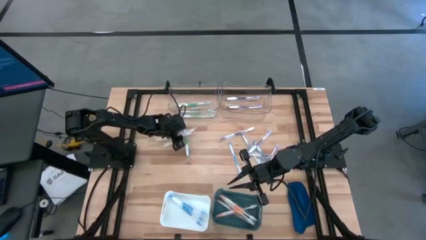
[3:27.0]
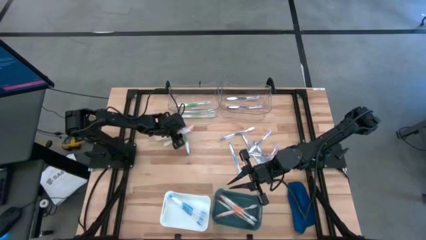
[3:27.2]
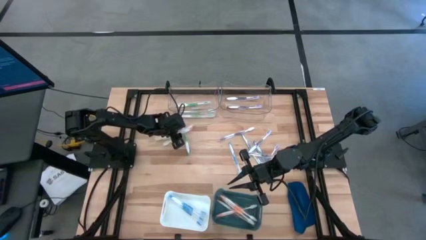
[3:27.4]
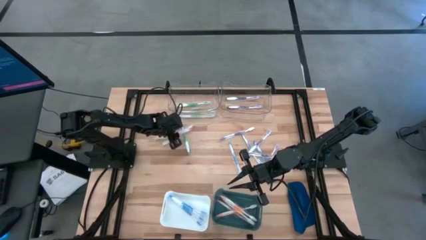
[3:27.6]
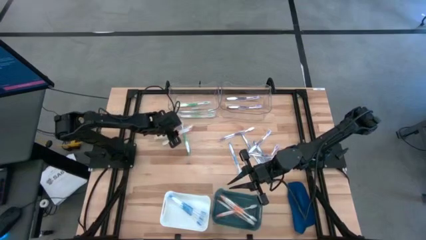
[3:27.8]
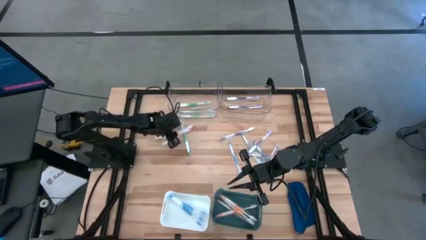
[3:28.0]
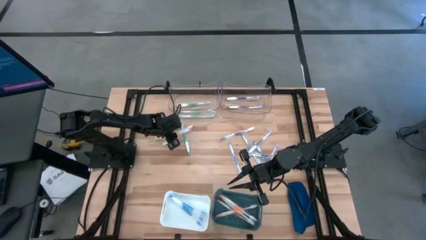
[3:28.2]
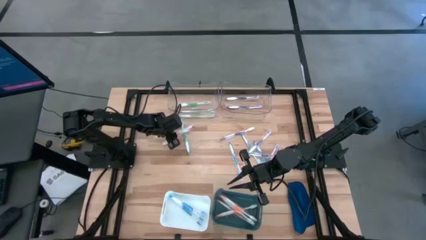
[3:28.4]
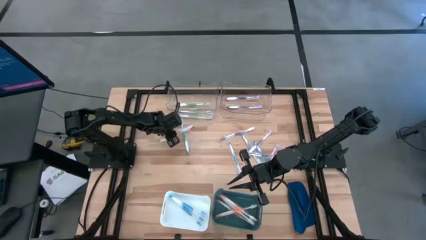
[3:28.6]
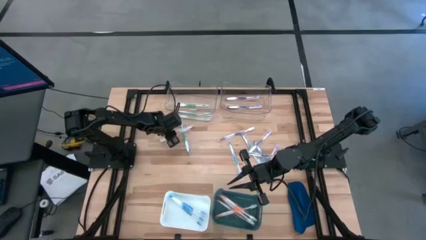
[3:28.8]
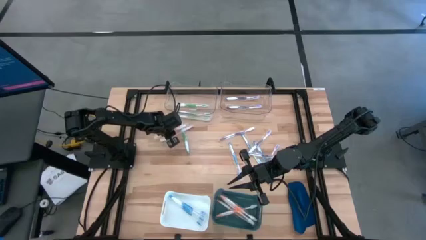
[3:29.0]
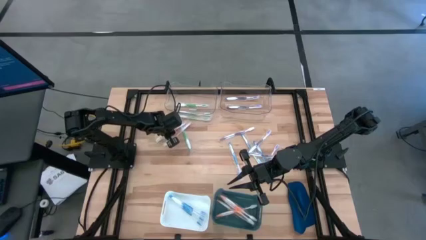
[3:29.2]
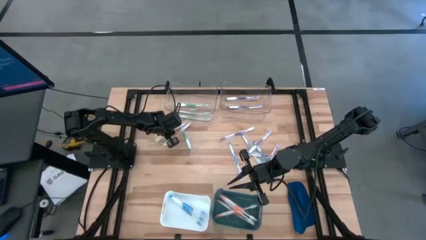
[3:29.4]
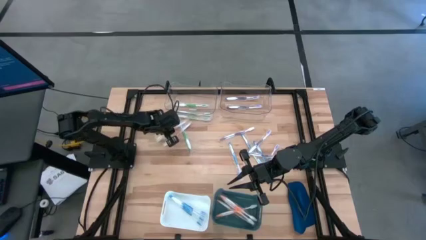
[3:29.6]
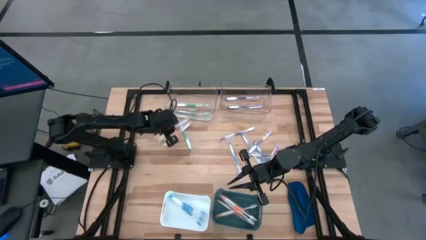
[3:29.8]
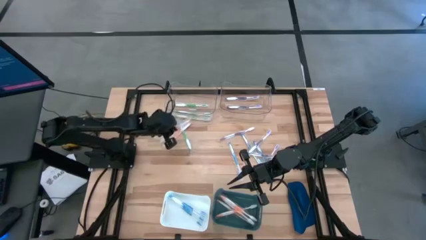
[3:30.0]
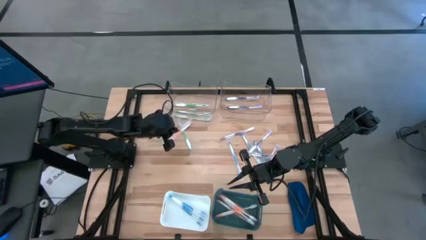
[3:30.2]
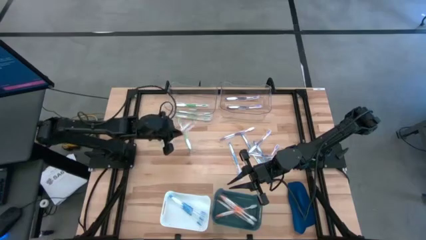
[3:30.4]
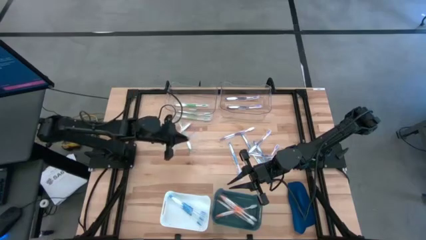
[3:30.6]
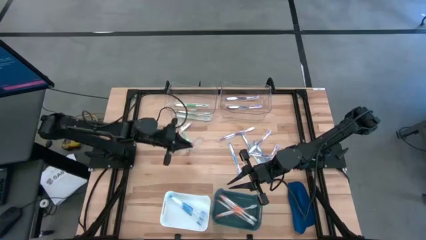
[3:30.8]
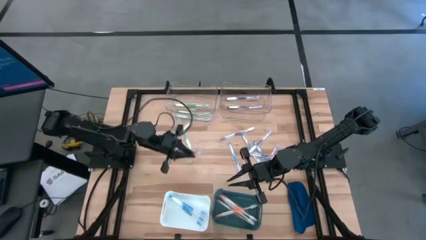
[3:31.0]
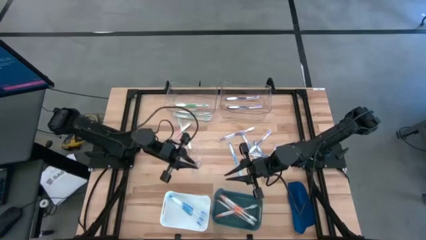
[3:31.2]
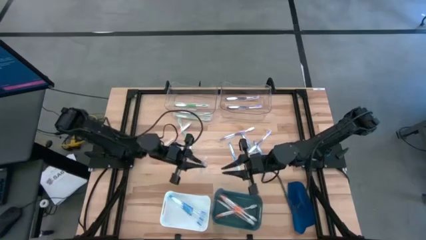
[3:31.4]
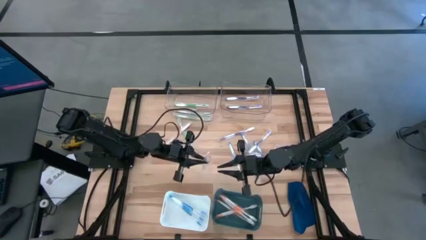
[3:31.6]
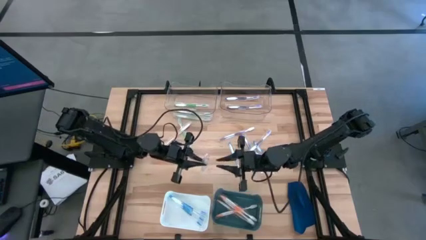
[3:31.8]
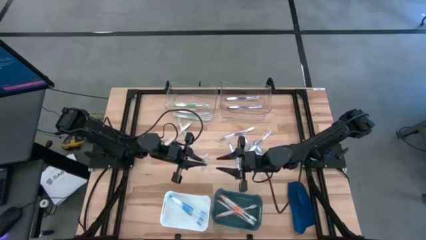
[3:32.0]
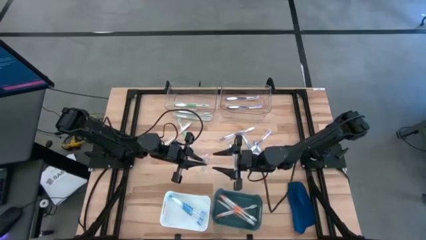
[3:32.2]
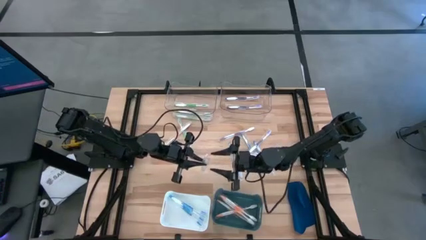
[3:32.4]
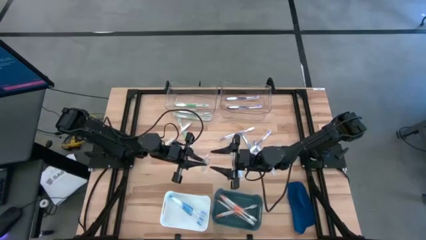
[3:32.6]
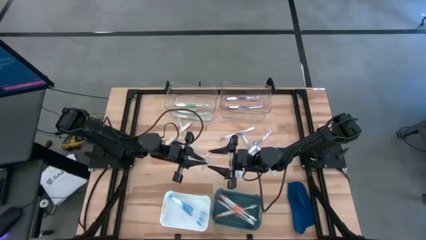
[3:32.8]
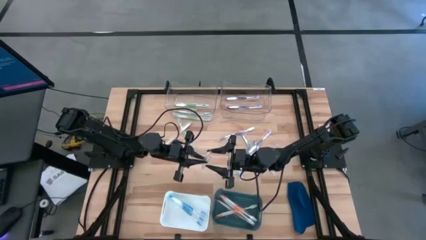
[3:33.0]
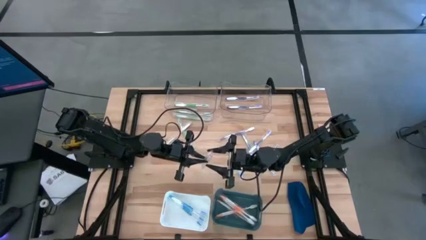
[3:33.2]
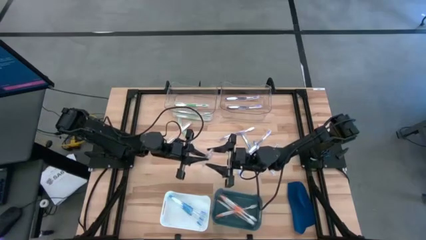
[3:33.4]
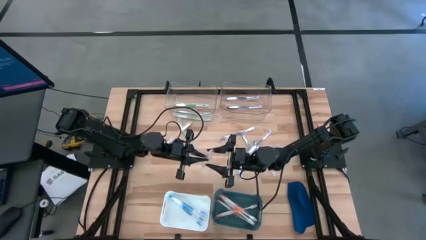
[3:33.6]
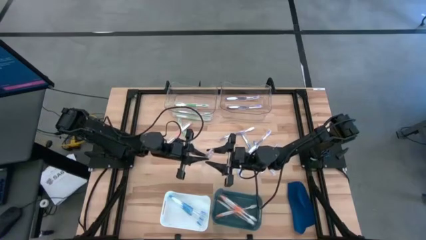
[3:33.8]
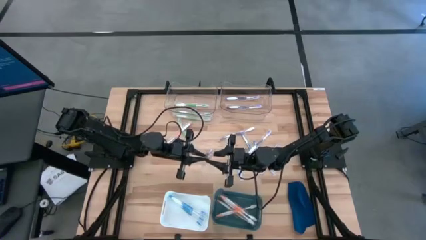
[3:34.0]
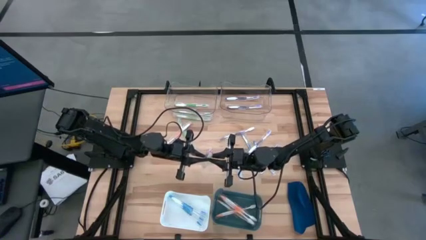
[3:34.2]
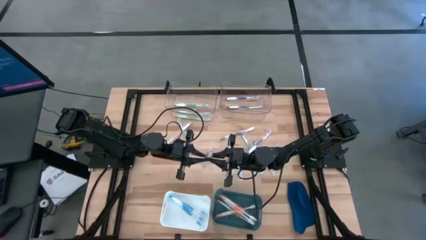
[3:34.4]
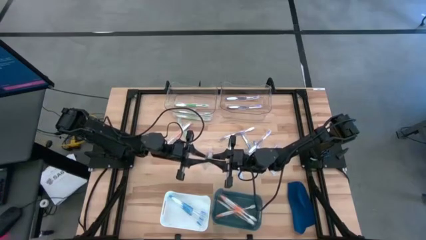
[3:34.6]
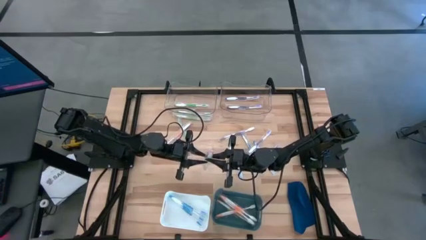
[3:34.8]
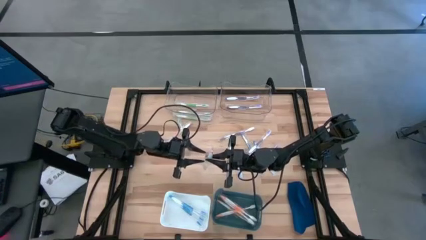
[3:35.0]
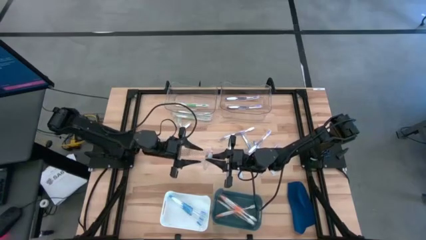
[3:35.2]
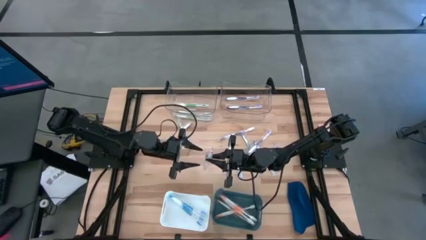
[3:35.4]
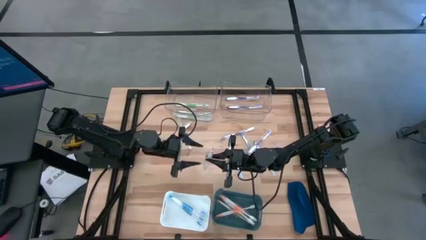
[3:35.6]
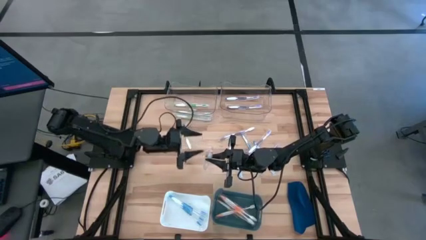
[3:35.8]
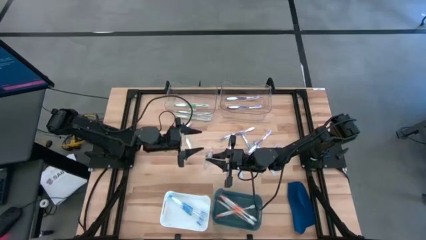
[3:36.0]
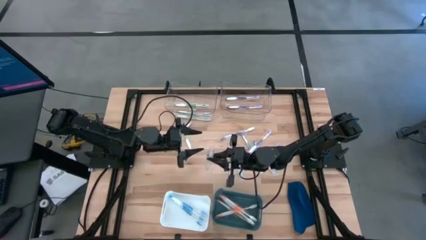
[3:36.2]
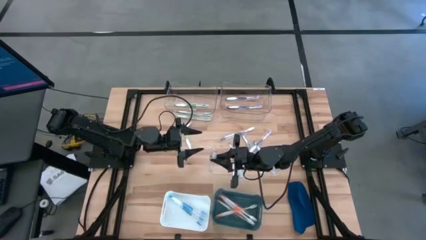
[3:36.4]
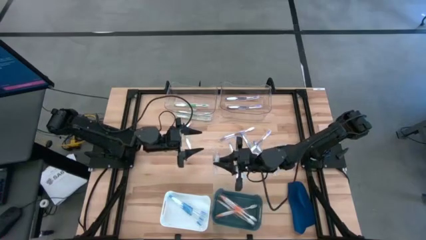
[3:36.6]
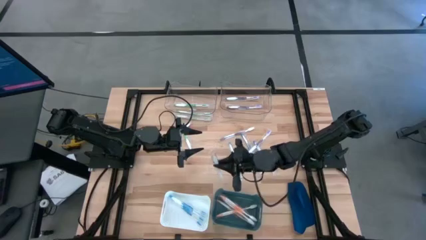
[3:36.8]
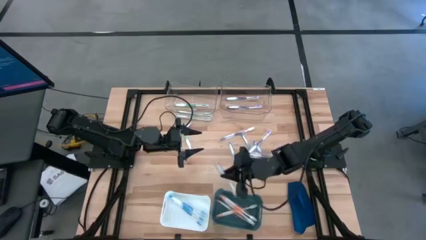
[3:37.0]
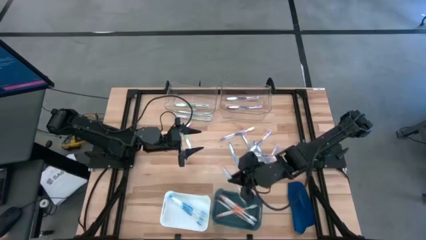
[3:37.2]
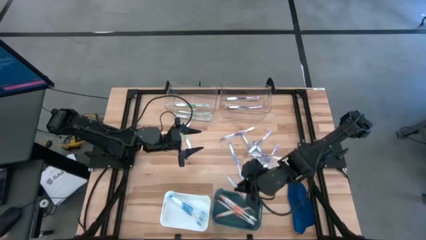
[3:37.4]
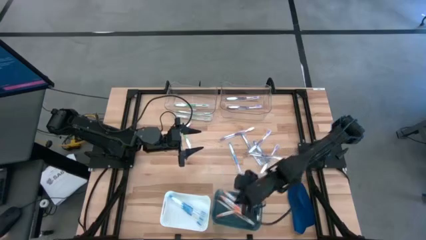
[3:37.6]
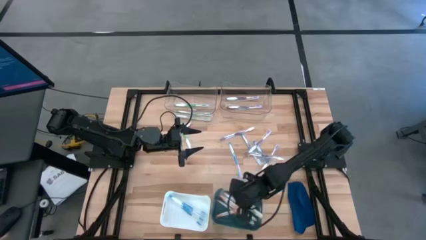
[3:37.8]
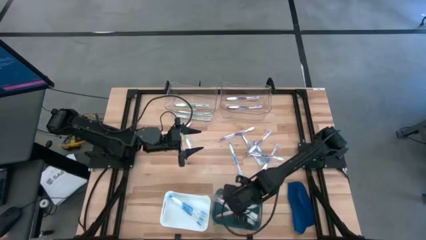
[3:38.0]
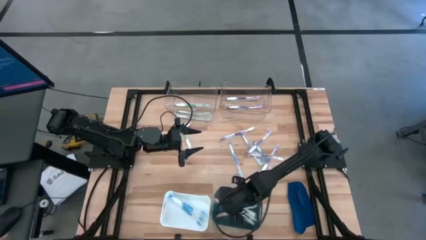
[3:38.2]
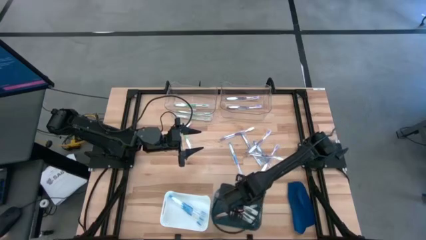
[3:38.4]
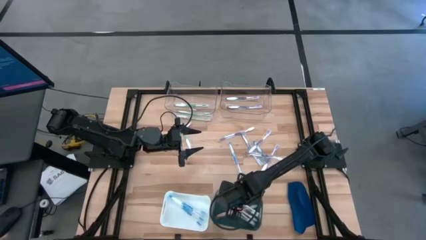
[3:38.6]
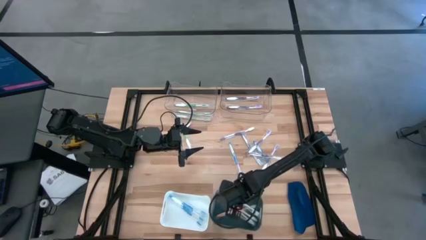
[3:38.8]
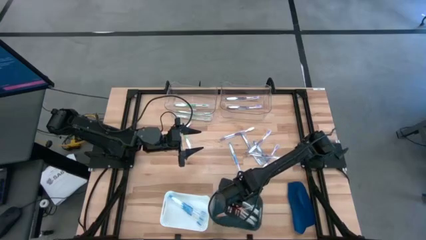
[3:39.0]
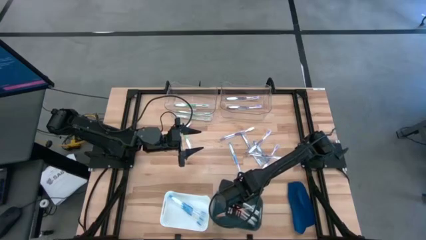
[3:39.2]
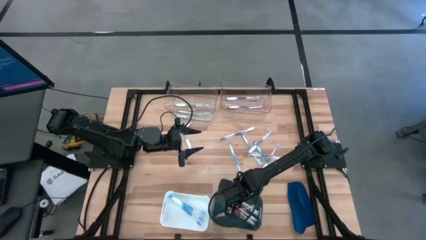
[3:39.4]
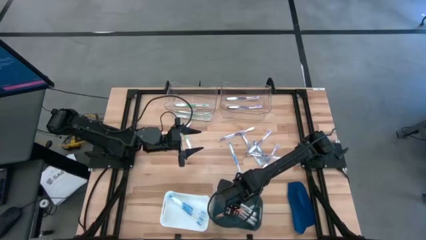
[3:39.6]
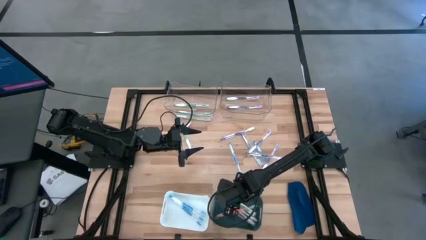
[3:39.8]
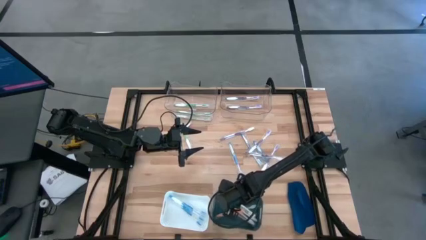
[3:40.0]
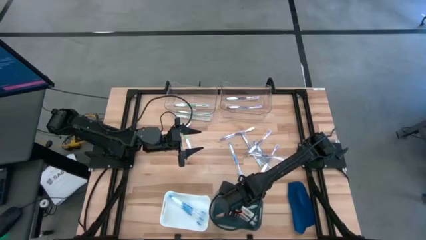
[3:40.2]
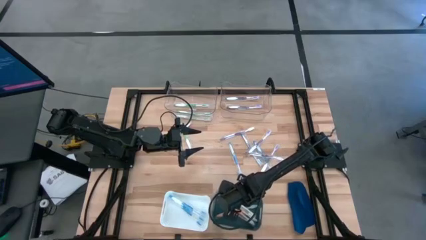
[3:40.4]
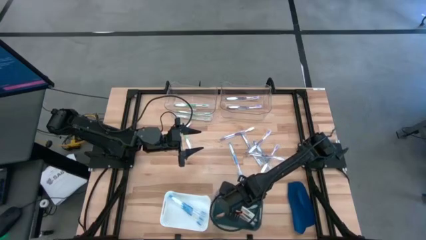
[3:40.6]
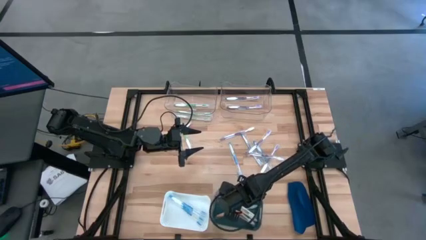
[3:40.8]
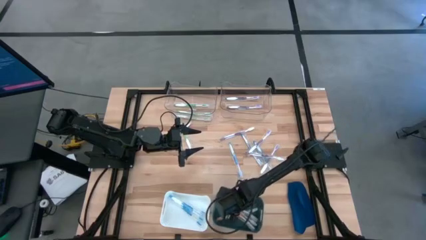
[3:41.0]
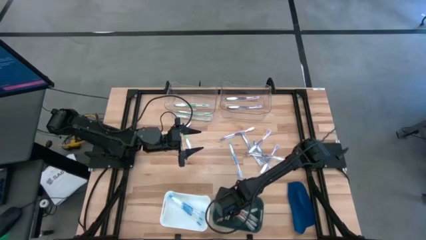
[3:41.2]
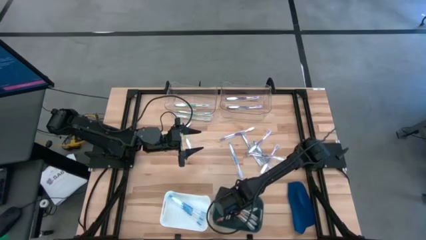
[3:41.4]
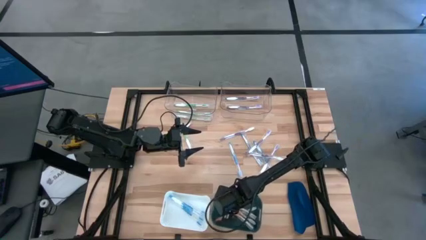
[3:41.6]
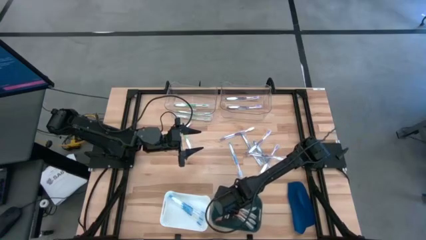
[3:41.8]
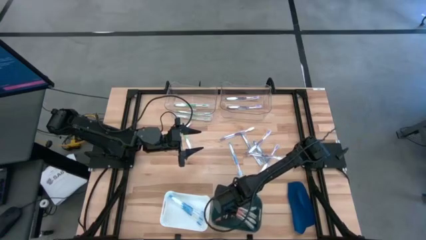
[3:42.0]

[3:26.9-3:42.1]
Task: Pick & Place Toothbrushes
Put the orange toothbrush into the green bin

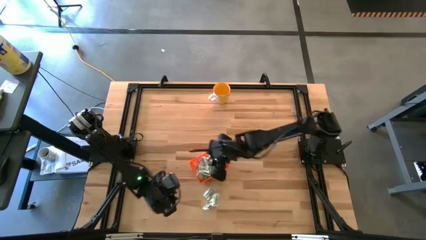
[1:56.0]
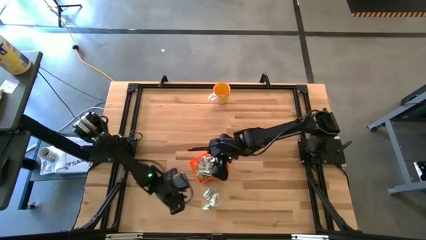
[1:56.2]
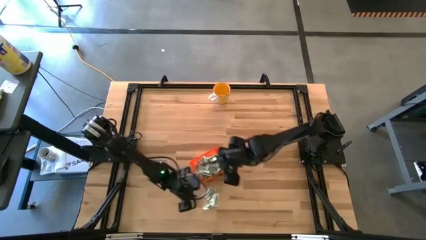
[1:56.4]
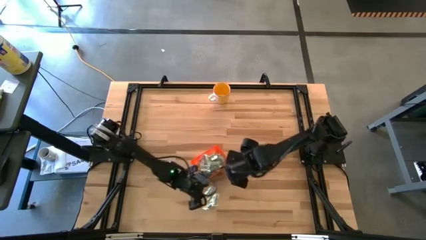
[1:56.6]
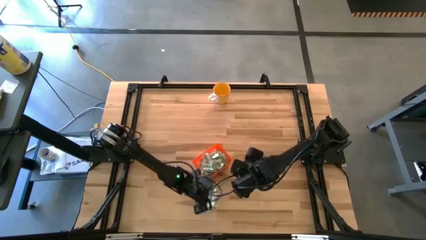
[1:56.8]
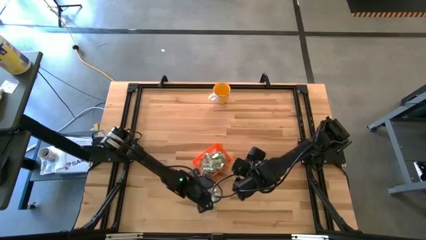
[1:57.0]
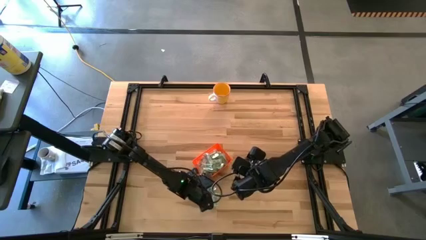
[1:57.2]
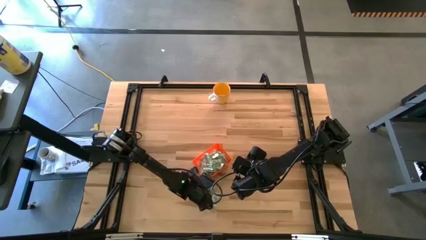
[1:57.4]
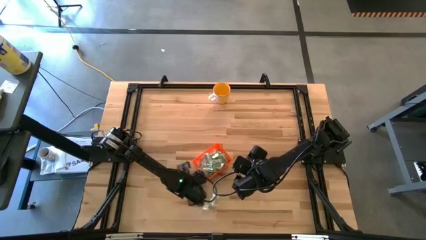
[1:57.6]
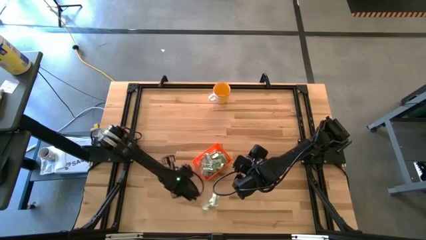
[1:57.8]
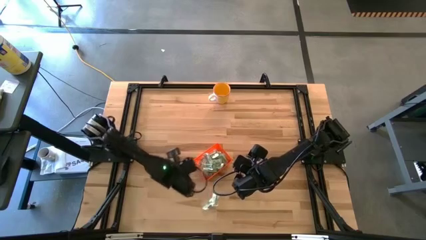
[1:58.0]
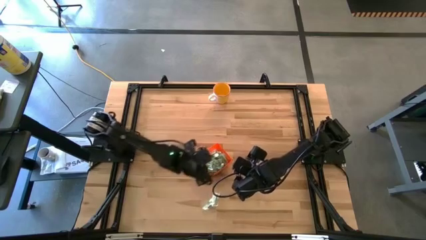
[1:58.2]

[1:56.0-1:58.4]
Task: Pick and place Stevia / Truvia into bins
Put the stevia packet into the bin

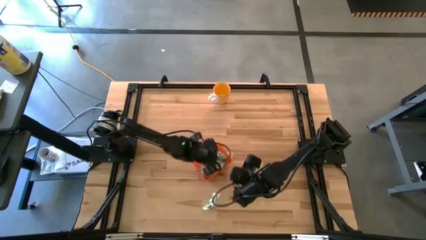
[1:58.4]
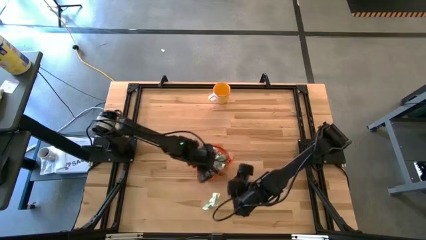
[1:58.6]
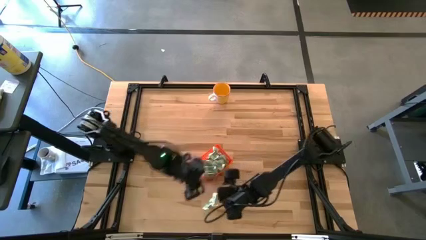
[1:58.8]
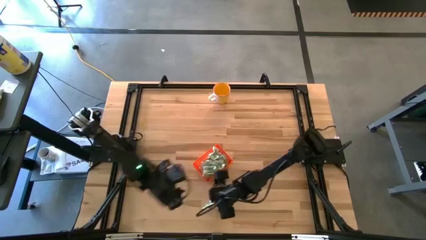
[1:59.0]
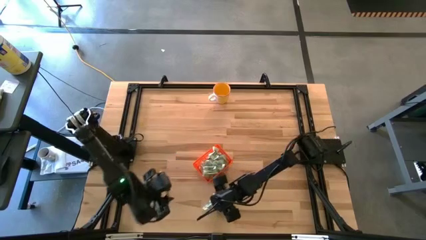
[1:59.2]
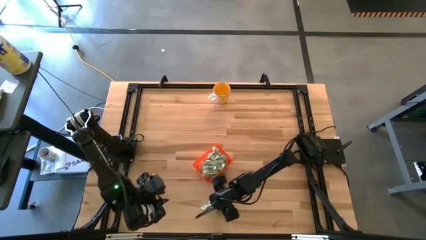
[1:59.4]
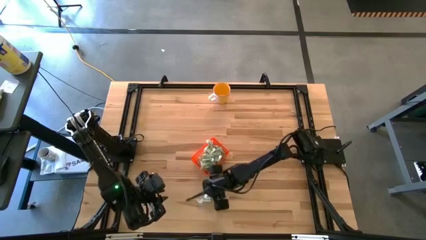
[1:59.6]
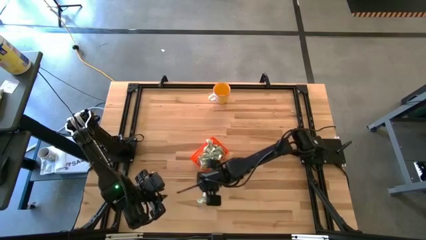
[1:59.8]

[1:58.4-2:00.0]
Put the stevia packet into the bin
